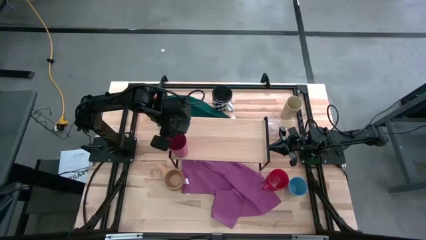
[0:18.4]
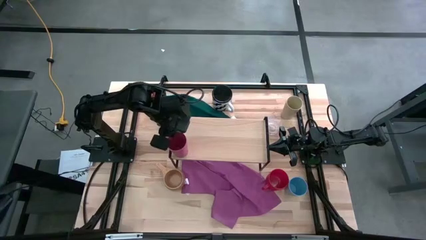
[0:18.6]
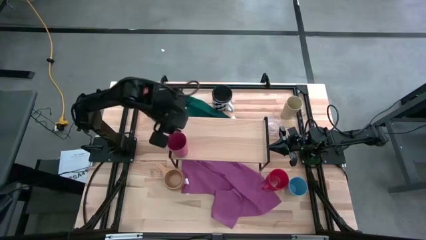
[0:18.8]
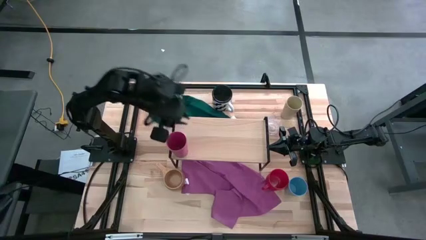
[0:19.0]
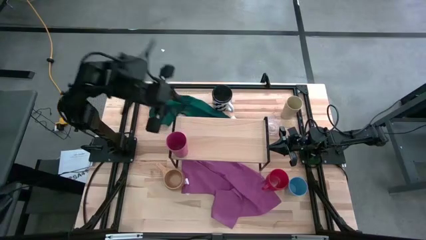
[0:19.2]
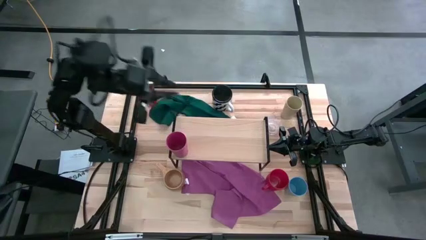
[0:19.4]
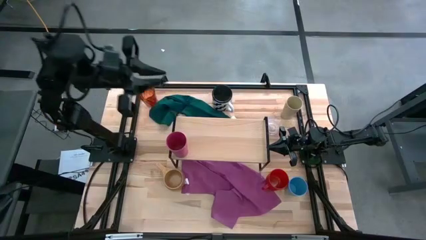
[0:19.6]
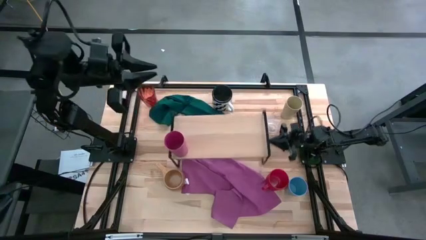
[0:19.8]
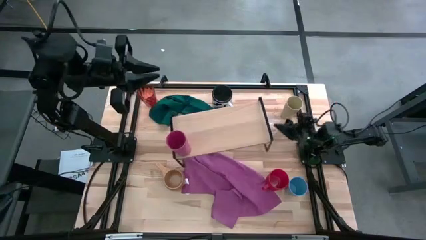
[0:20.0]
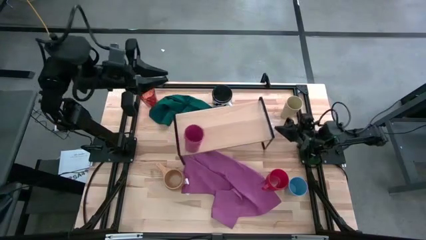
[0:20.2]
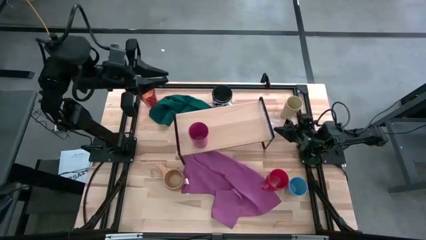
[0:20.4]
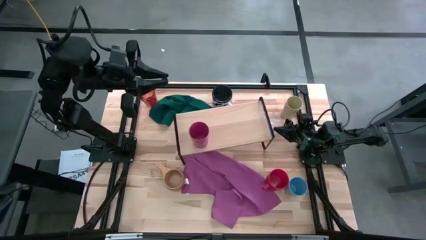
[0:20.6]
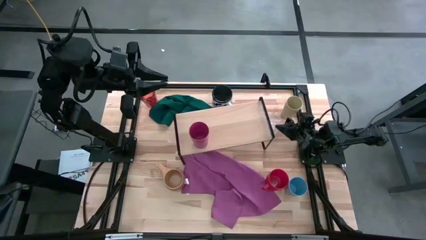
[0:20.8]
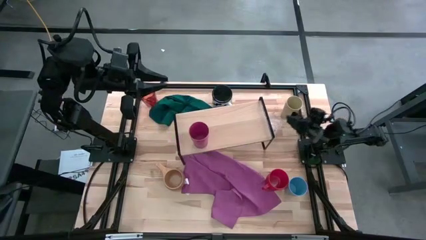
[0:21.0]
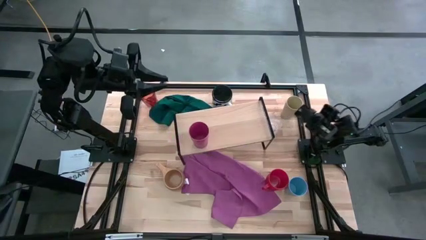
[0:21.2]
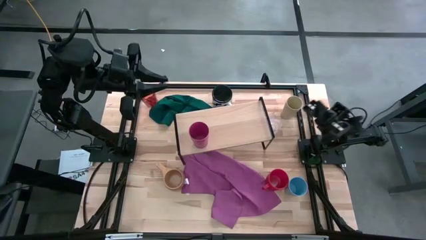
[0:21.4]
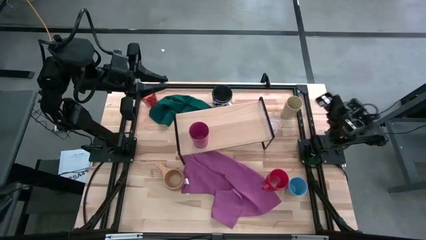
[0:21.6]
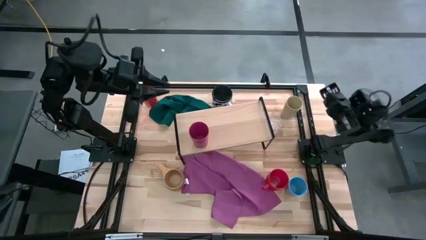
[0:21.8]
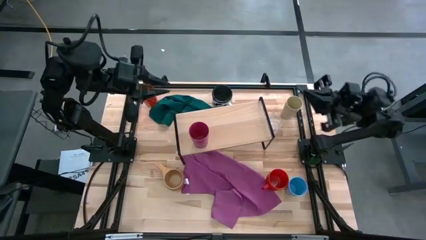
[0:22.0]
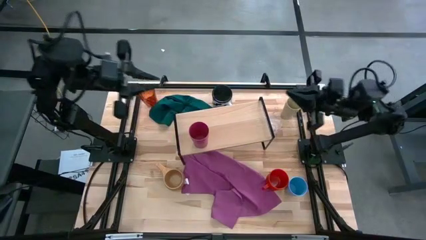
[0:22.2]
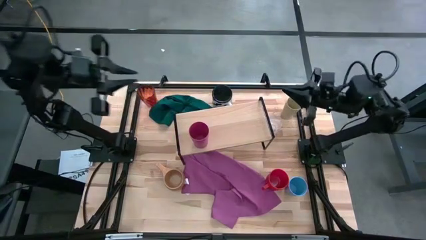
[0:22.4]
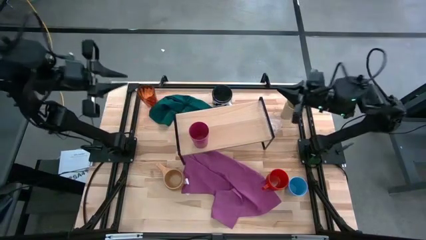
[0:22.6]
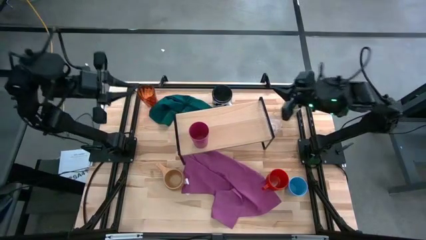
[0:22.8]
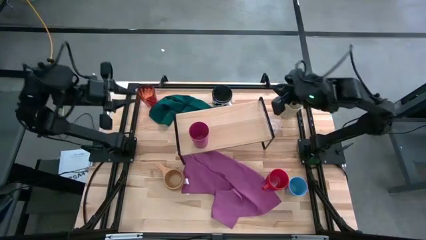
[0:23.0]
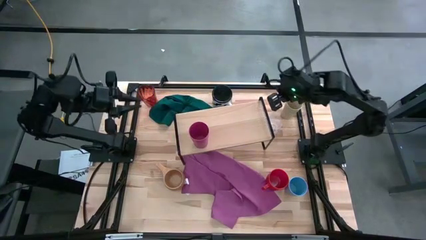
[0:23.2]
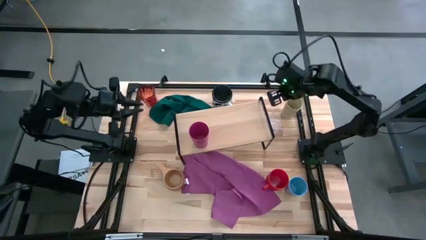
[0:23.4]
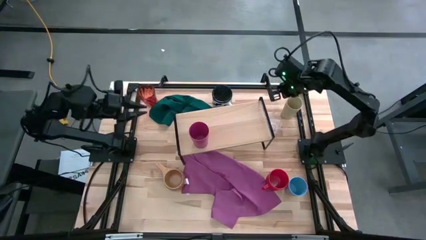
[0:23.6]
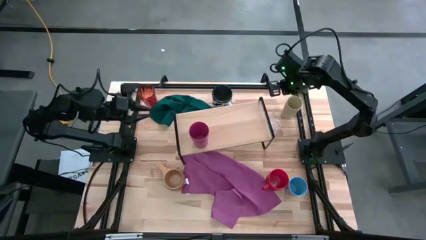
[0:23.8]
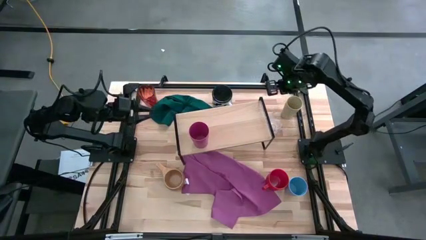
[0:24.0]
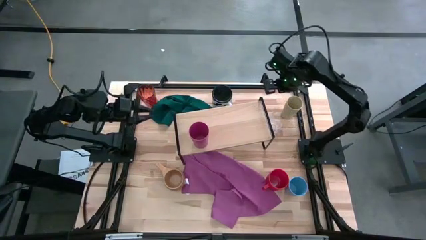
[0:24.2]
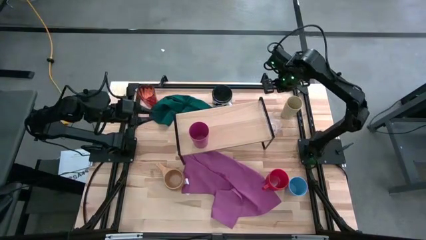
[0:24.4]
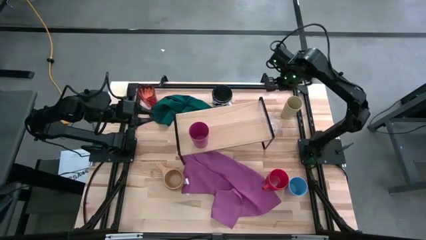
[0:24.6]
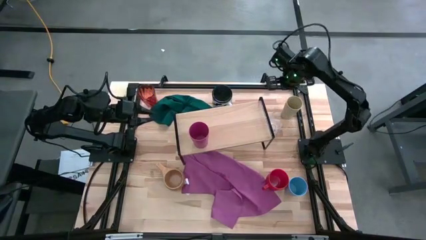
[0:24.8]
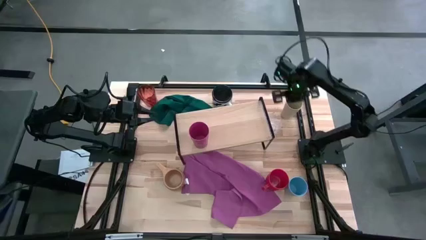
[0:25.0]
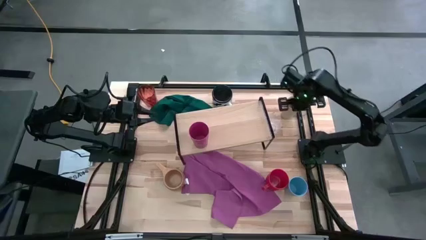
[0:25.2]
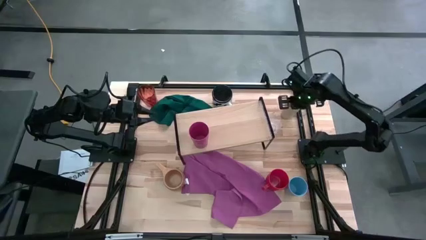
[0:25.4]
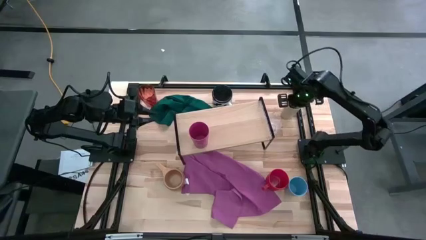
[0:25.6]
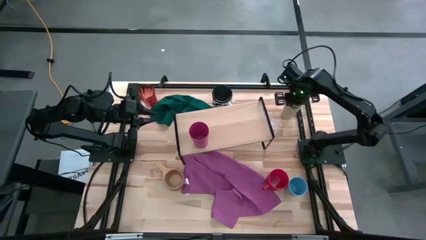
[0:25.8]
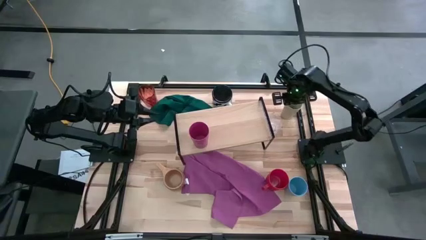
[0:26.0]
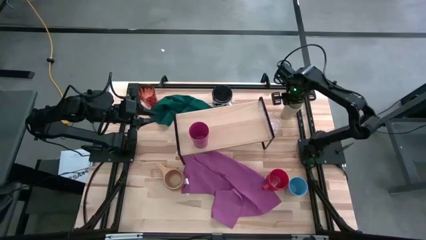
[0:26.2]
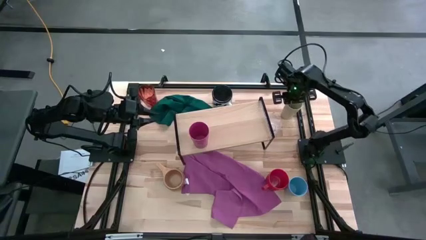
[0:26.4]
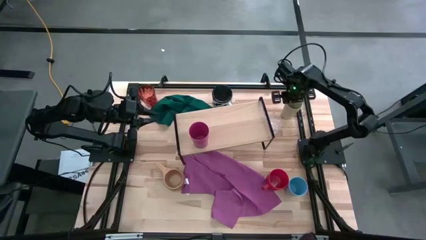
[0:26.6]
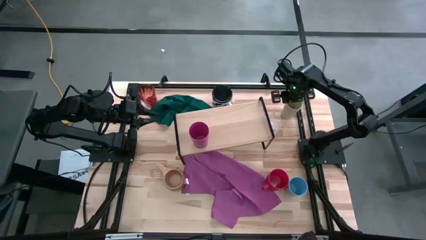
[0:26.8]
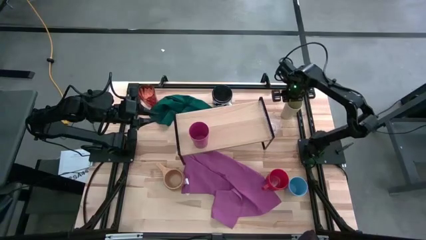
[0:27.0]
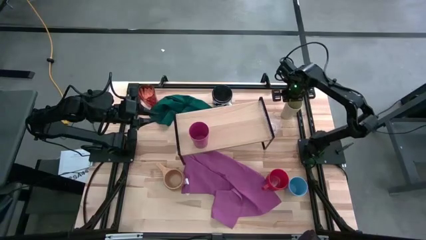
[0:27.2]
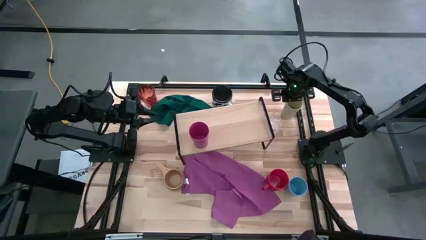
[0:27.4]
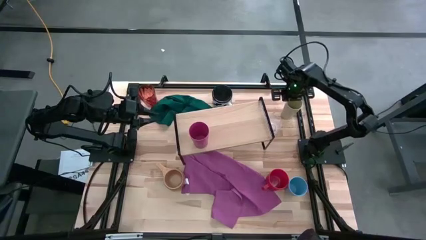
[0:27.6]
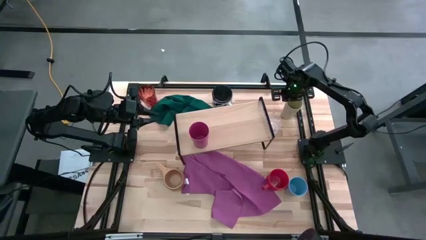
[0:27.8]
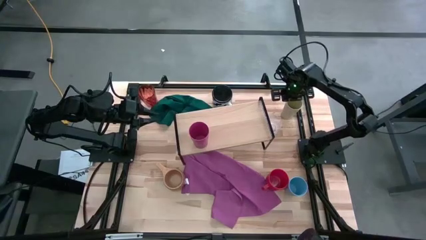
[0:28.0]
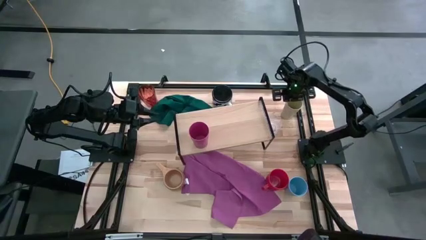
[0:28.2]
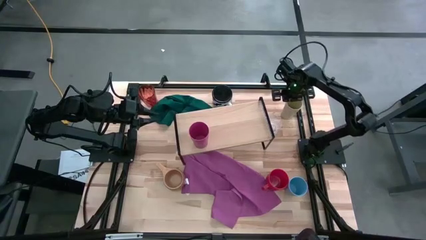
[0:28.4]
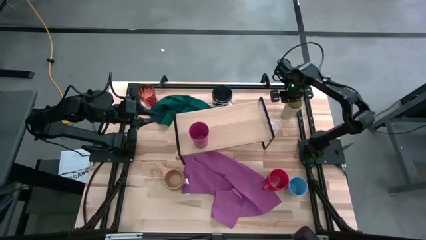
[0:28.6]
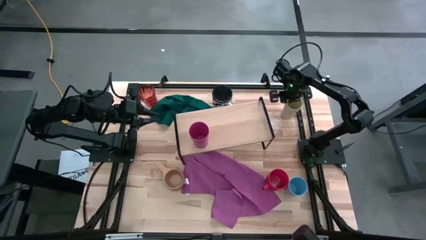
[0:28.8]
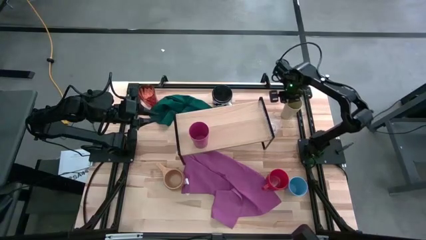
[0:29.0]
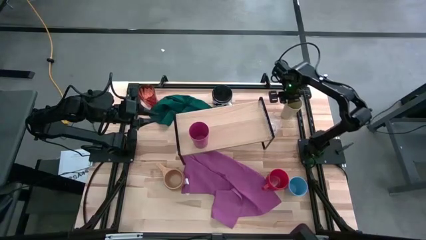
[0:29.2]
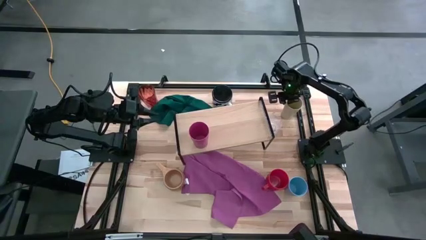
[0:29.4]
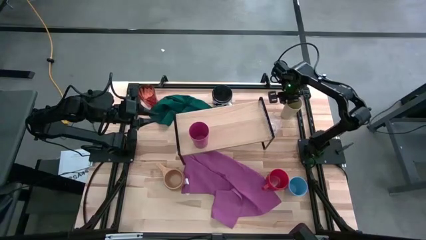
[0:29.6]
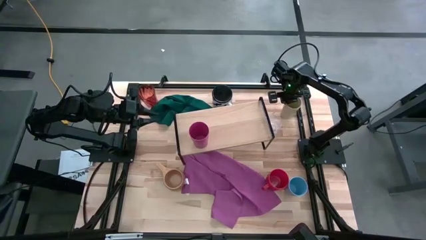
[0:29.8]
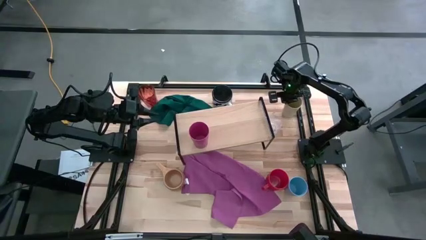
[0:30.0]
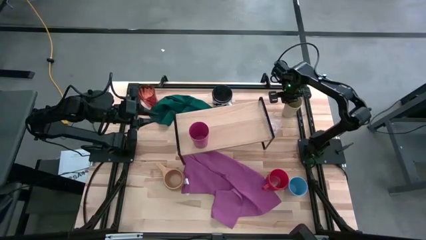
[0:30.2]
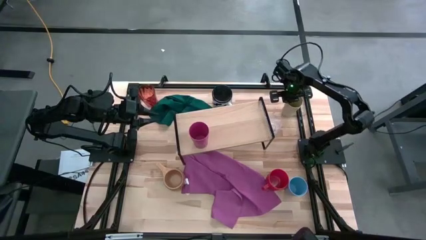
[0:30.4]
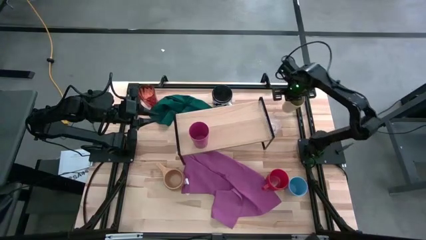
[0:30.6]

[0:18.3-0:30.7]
Task: Stack small to large cups/mugs on shelf
Put the white cup on the shelf
